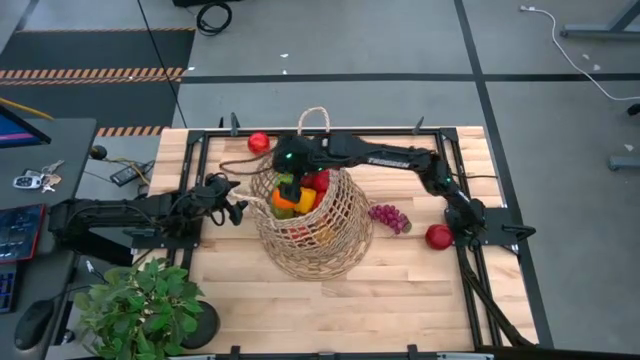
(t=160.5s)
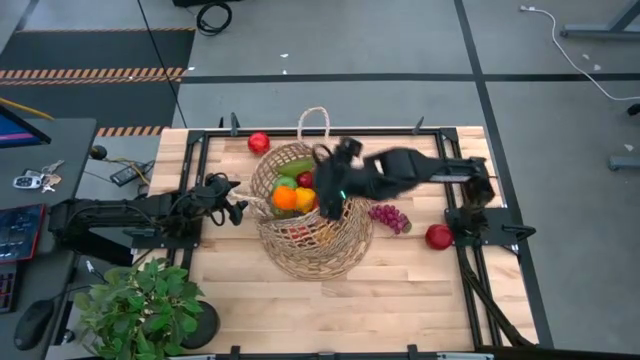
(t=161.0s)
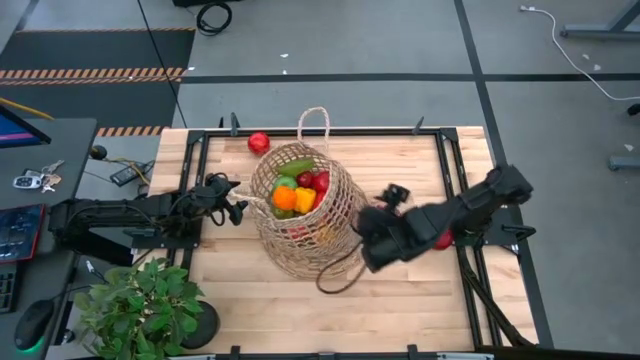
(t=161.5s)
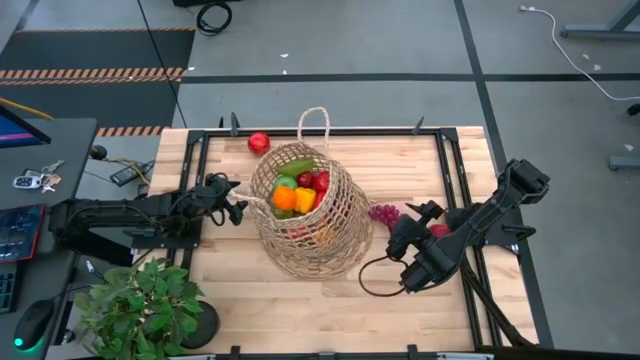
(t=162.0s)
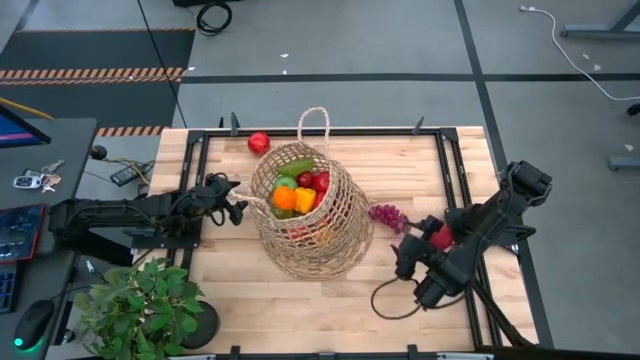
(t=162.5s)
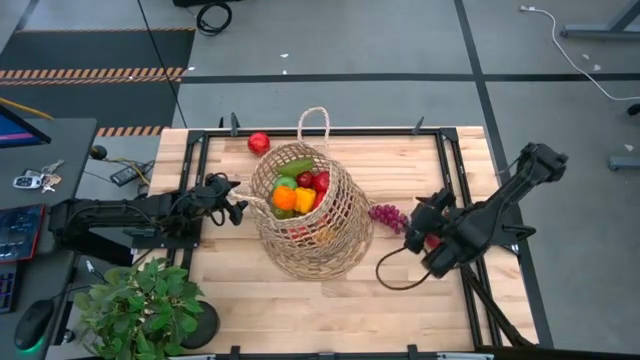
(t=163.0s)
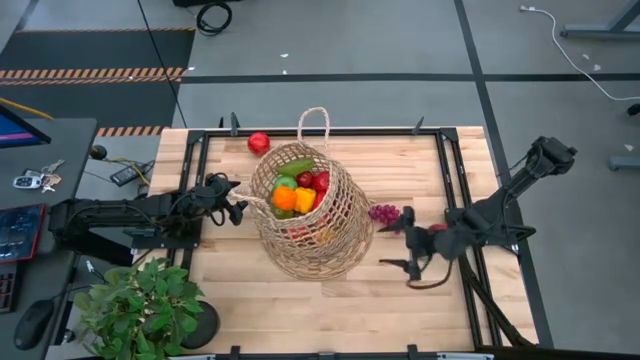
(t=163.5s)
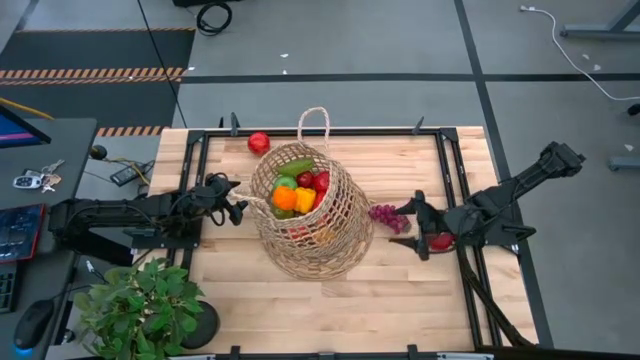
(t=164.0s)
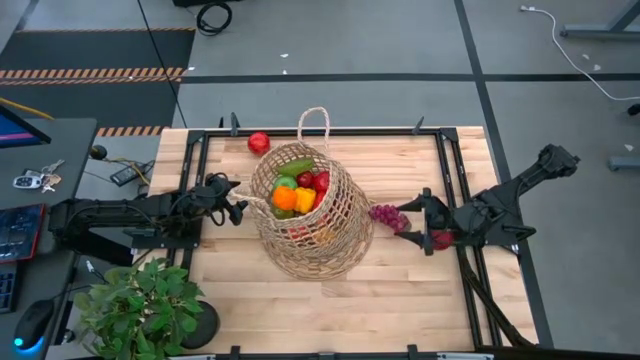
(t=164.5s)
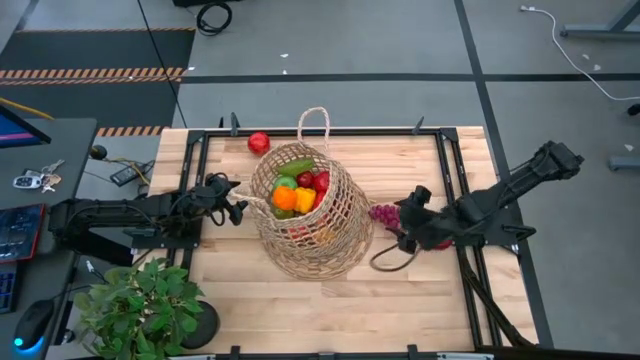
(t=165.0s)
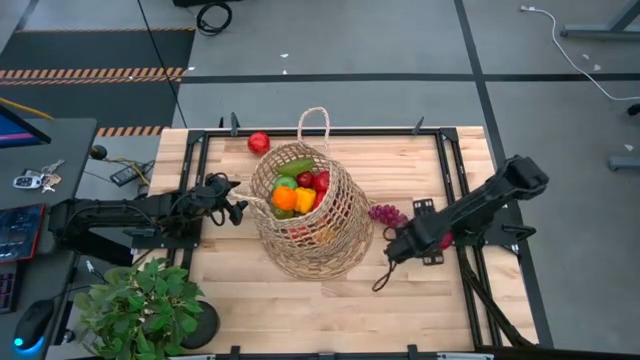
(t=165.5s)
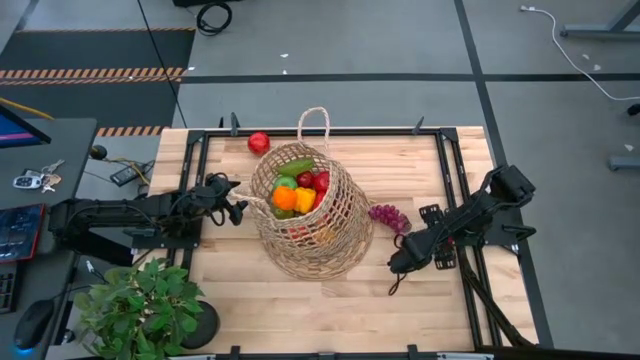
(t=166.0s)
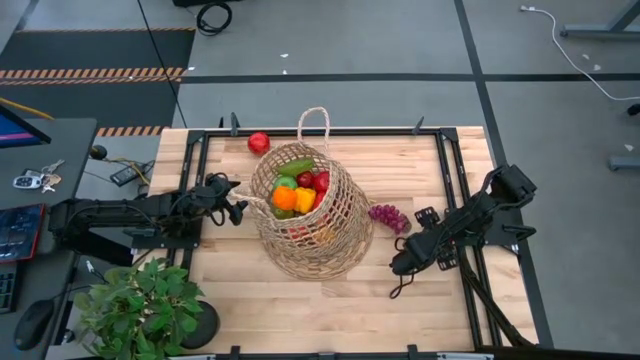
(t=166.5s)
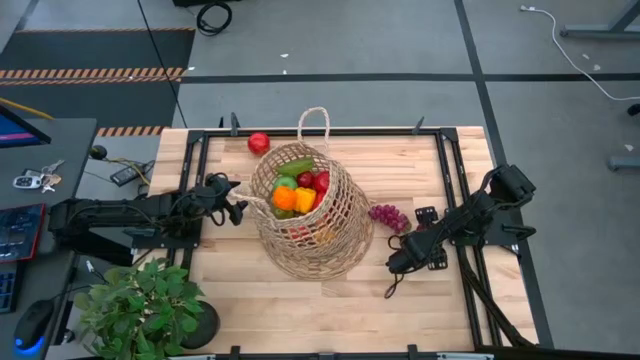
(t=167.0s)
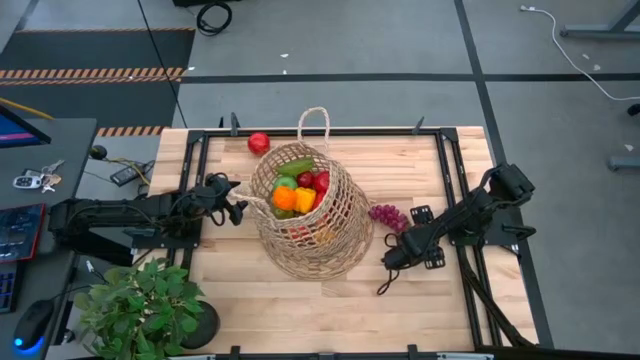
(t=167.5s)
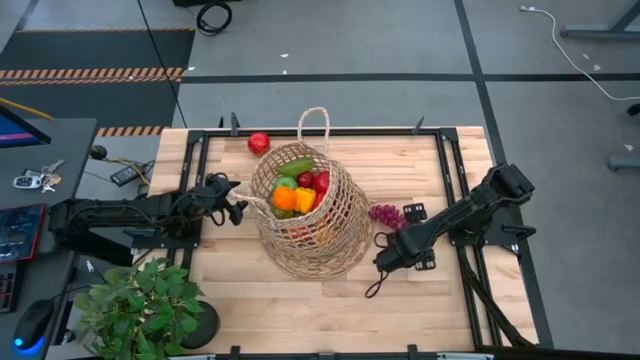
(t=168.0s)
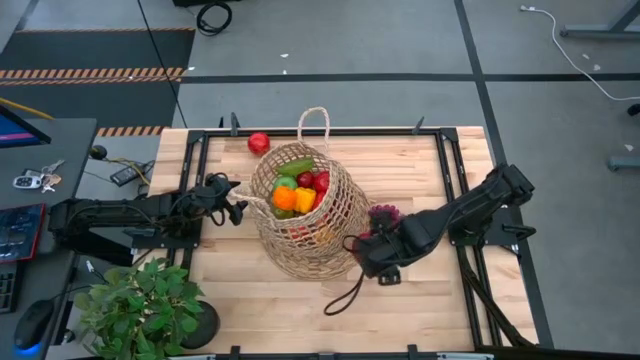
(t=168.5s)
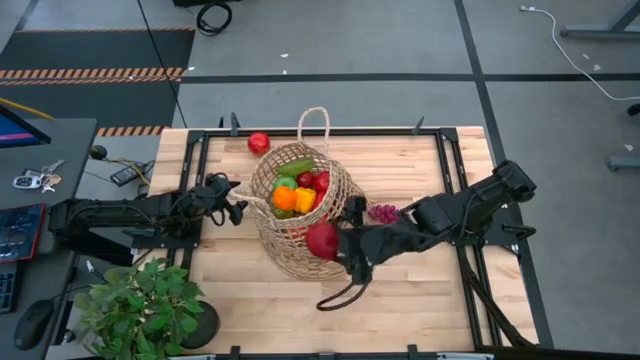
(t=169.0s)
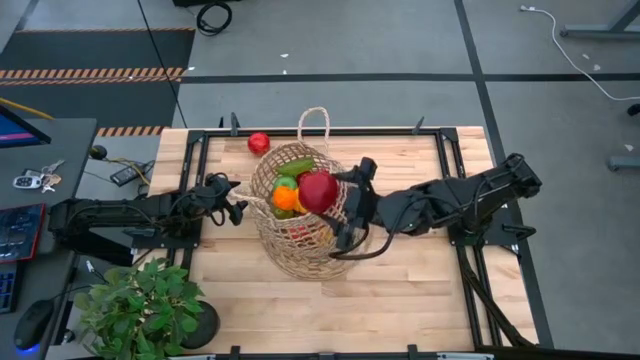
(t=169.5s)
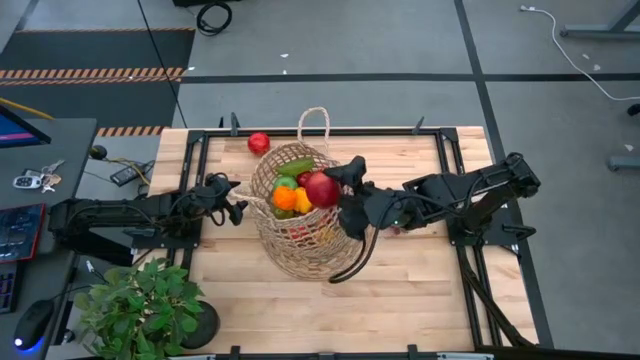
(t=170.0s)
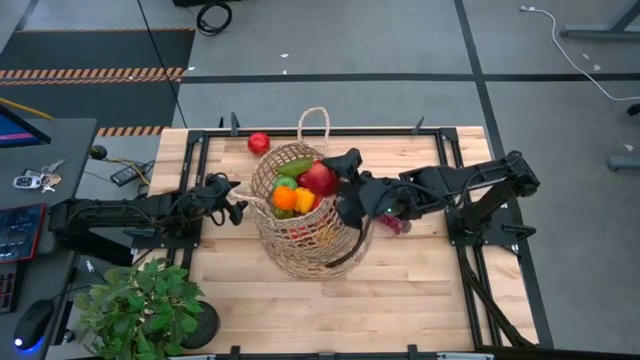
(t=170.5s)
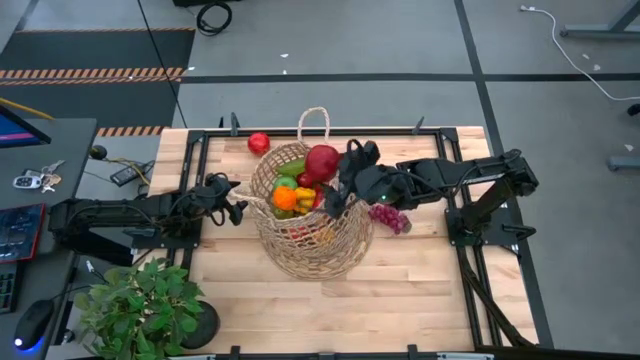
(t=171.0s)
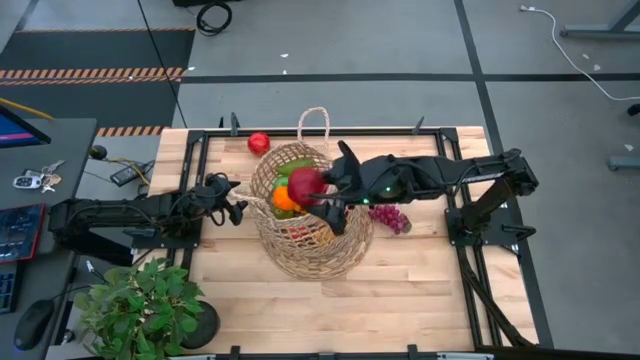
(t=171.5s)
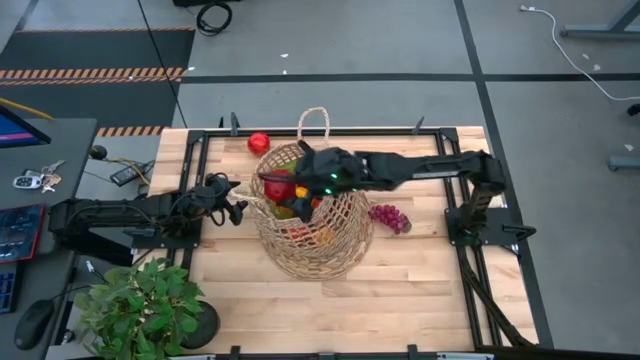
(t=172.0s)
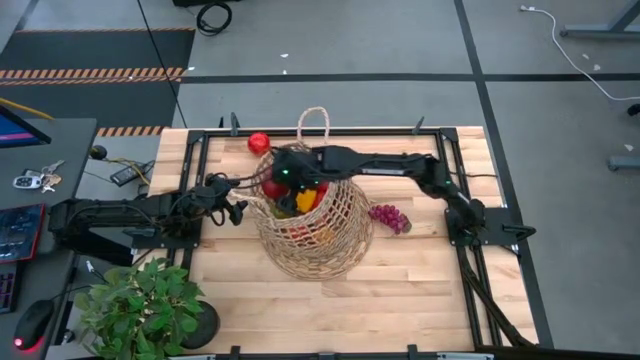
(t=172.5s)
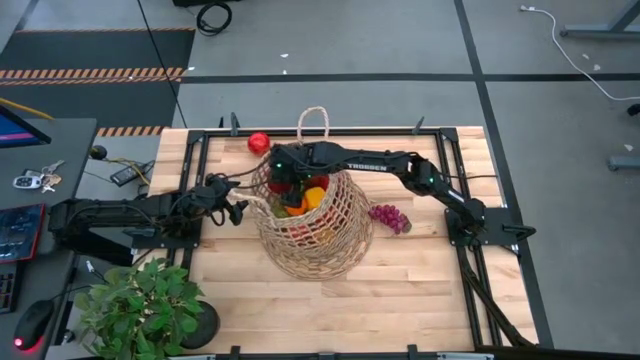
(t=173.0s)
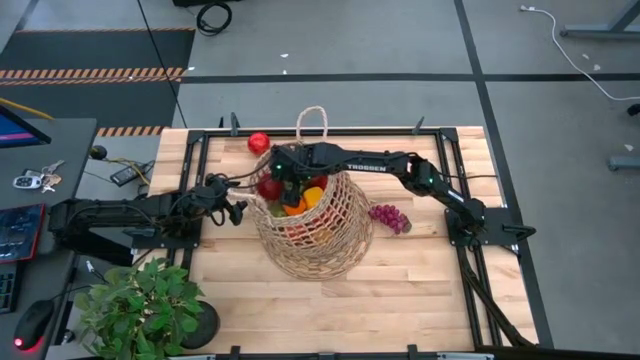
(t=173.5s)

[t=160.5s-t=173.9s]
Task: Build produce basket
Put the red pomegranate into the basket

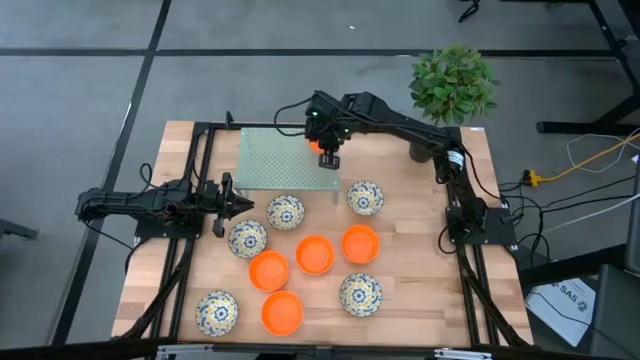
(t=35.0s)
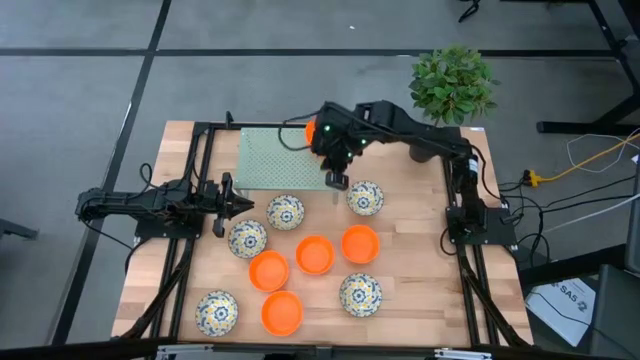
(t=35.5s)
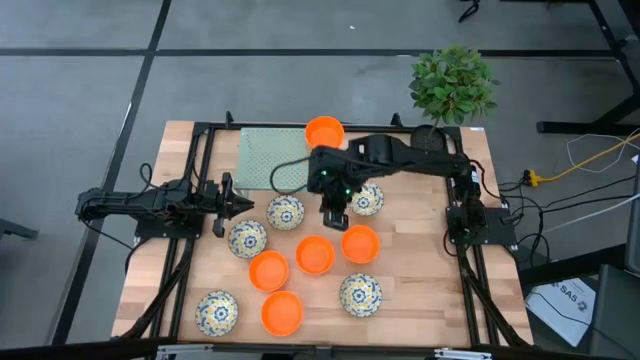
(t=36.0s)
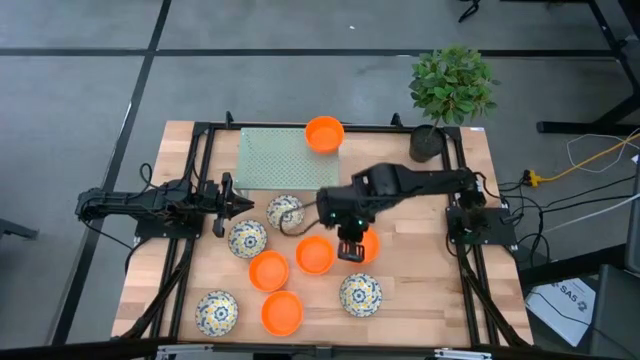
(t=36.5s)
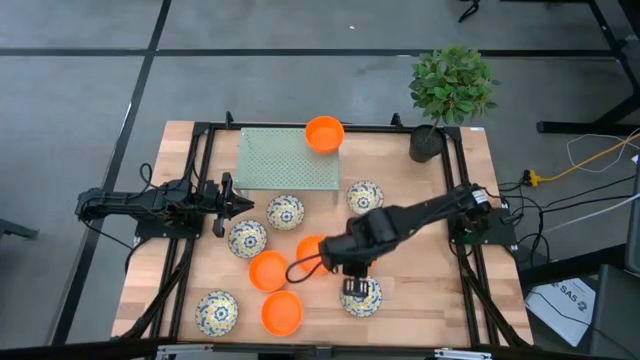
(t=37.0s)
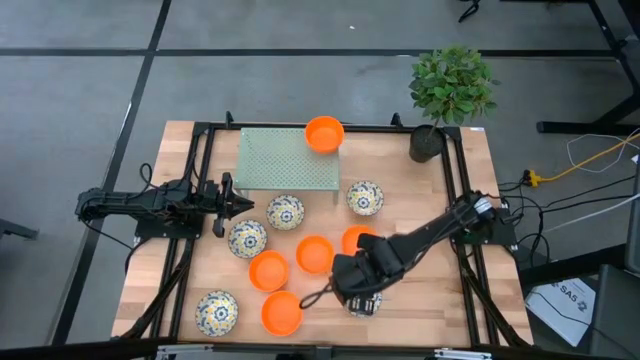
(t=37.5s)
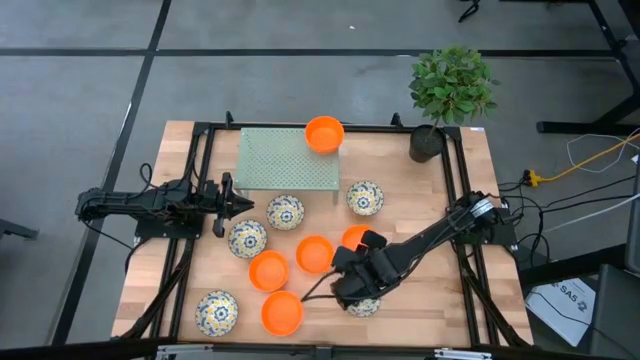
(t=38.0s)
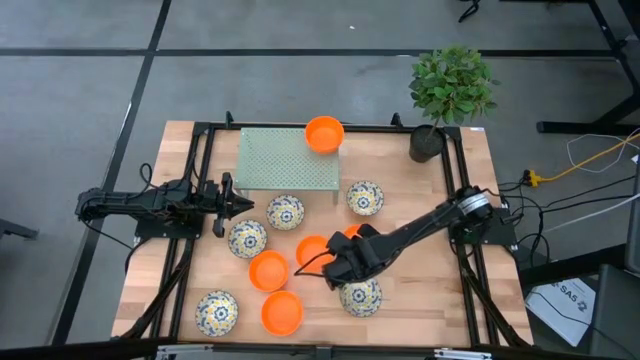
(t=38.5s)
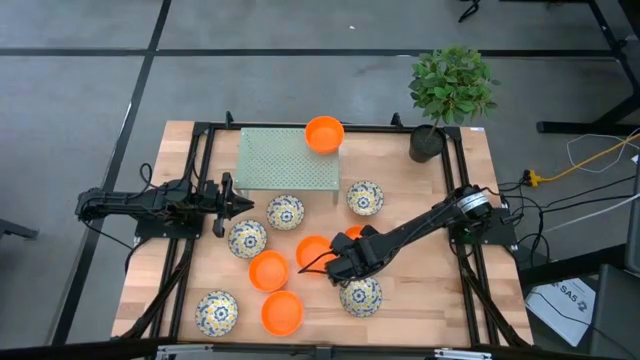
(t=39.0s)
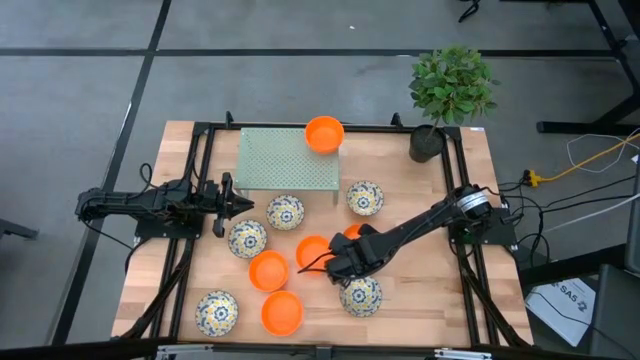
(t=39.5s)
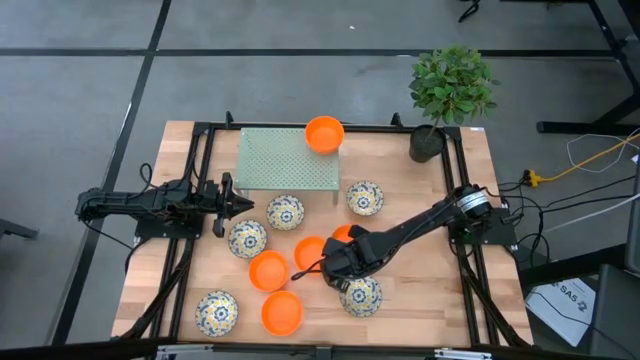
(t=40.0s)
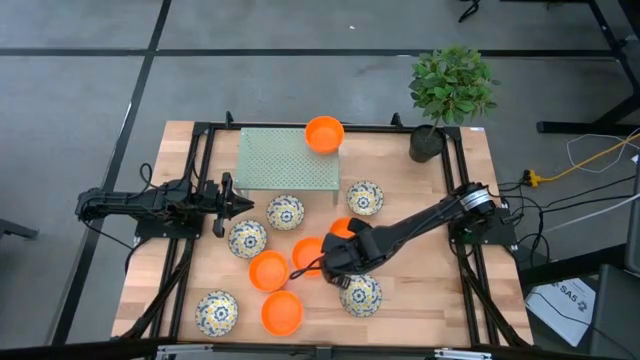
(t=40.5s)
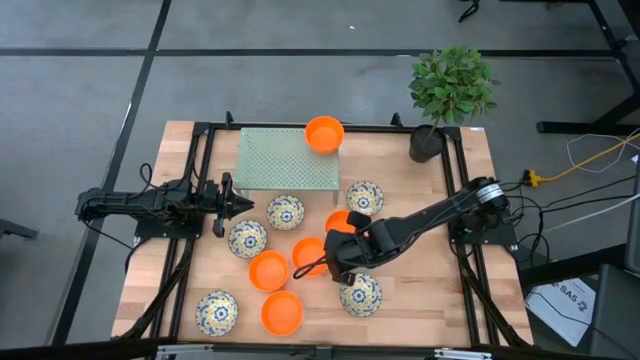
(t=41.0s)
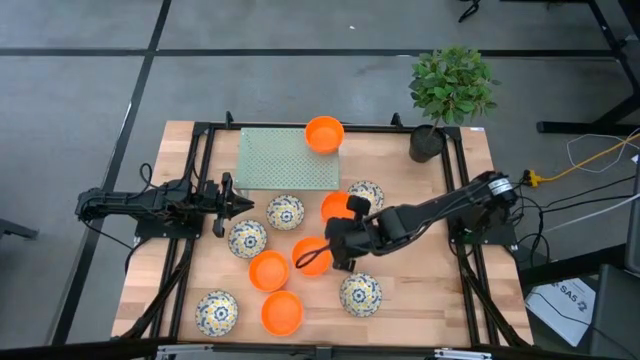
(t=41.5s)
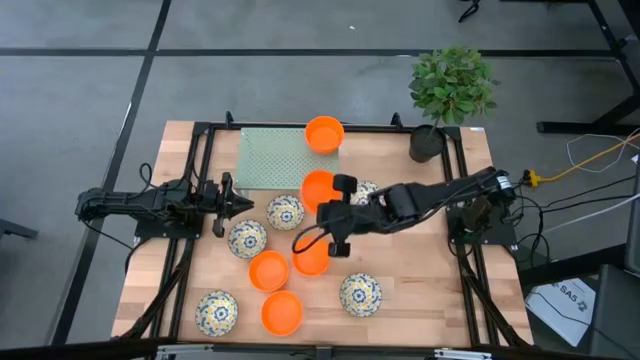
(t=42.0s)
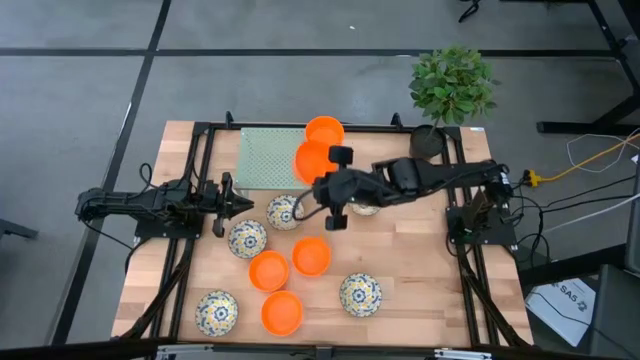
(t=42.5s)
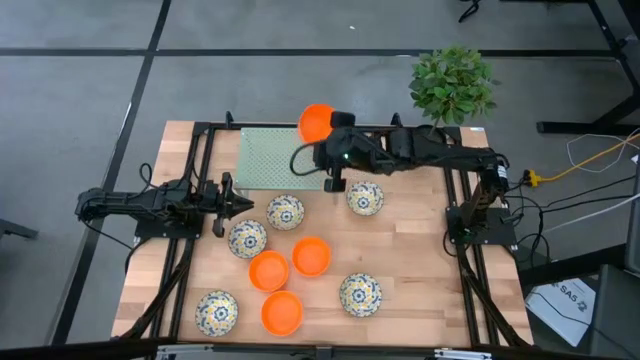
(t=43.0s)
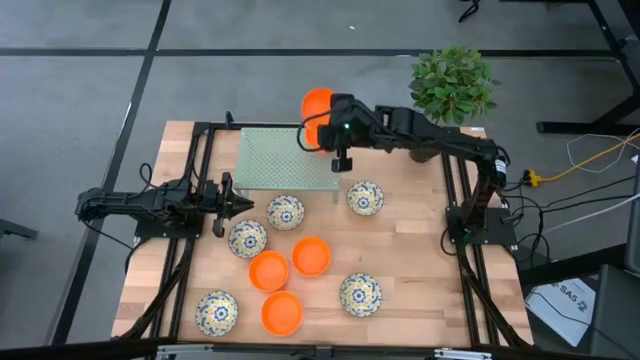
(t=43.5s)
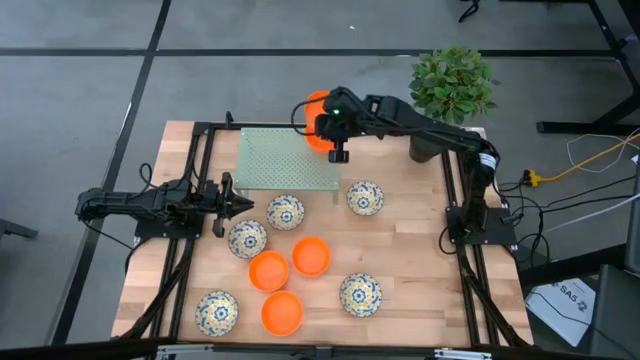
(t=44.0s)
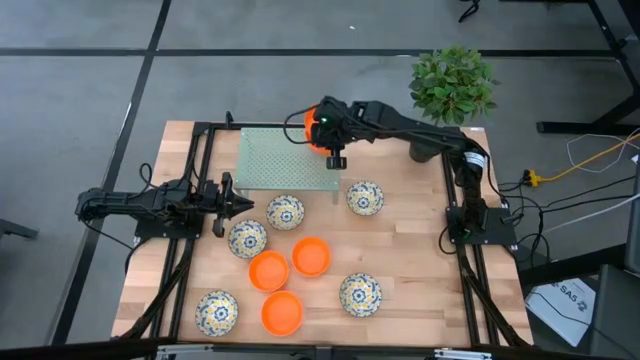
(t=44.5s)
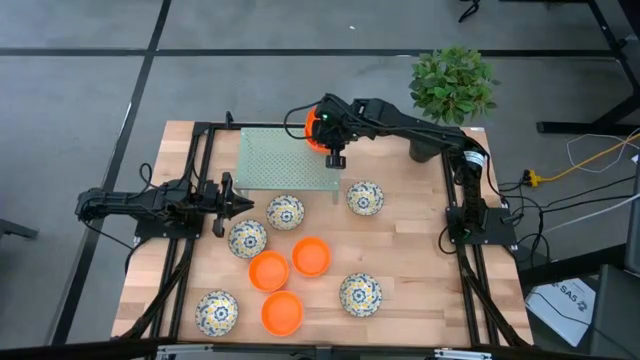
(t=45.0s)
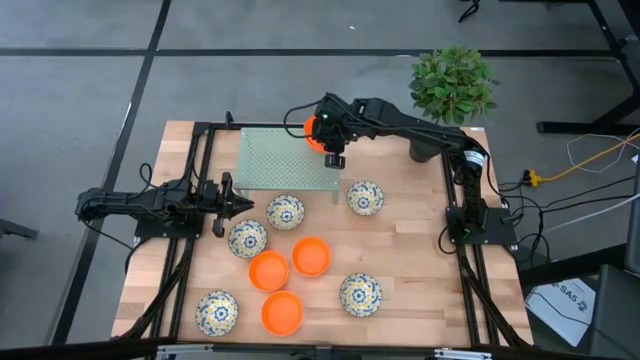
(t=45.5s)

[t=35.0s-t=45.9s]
Task: Pick & Place Mini bowls
Stack the orange bowl on top of the other orange bowls on the shelf
